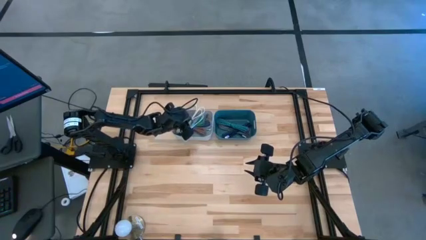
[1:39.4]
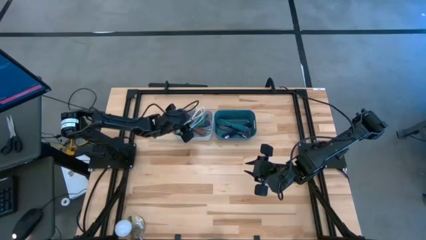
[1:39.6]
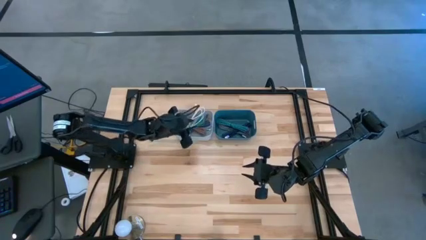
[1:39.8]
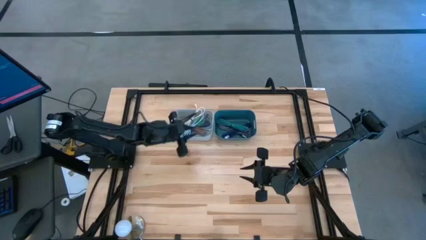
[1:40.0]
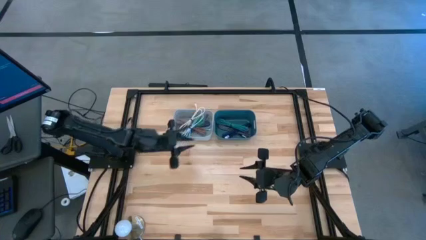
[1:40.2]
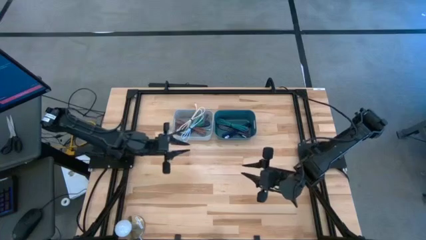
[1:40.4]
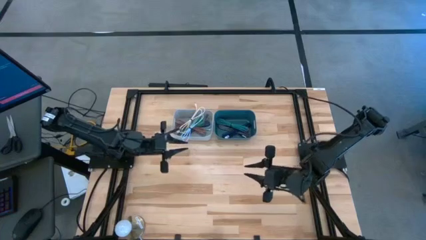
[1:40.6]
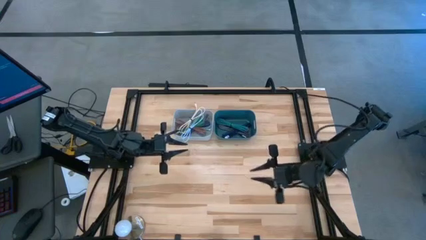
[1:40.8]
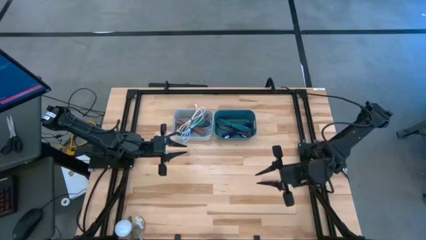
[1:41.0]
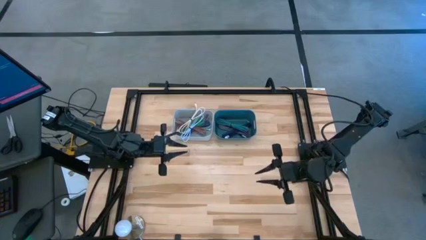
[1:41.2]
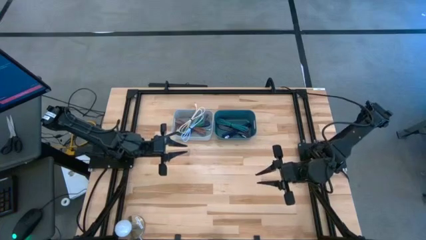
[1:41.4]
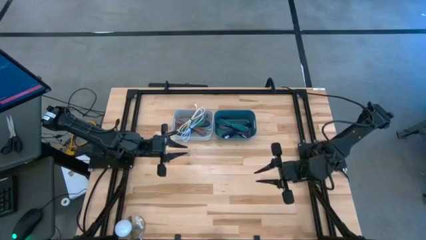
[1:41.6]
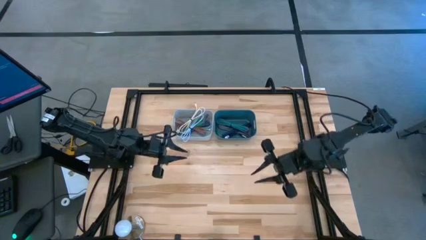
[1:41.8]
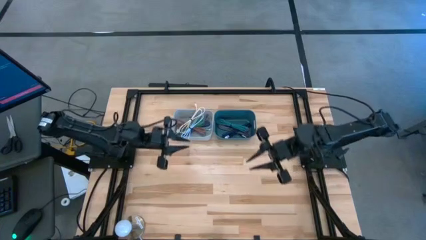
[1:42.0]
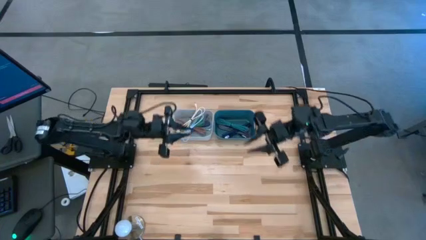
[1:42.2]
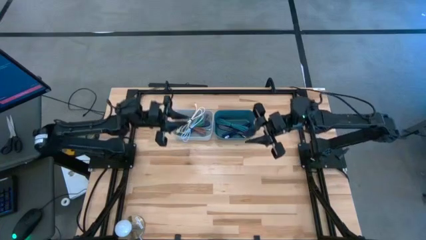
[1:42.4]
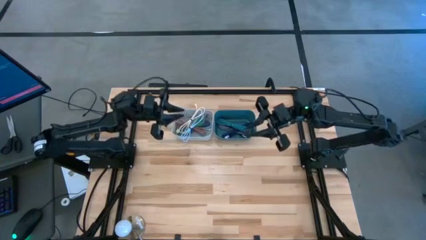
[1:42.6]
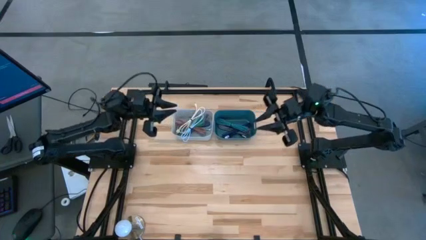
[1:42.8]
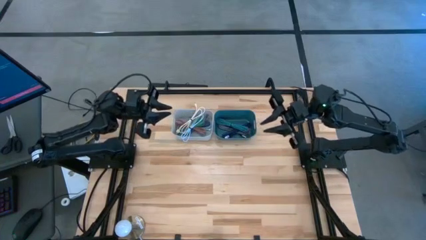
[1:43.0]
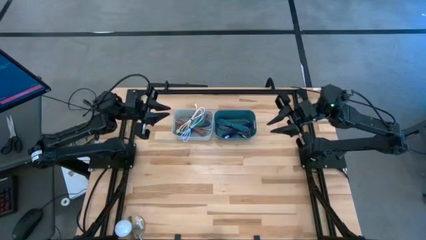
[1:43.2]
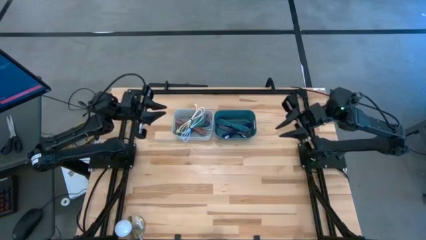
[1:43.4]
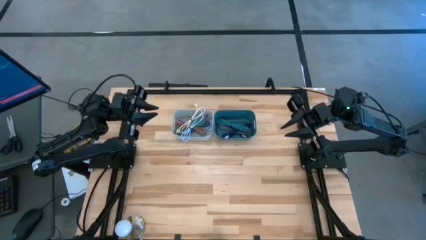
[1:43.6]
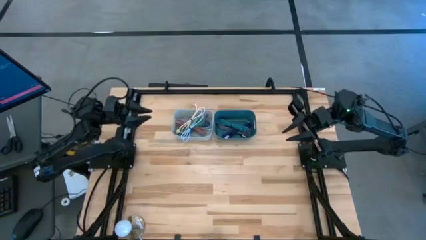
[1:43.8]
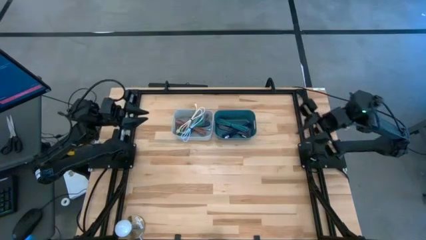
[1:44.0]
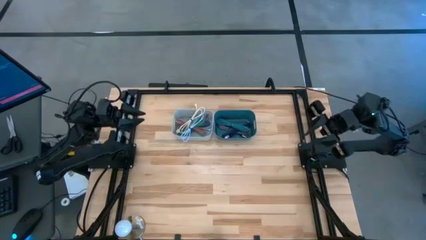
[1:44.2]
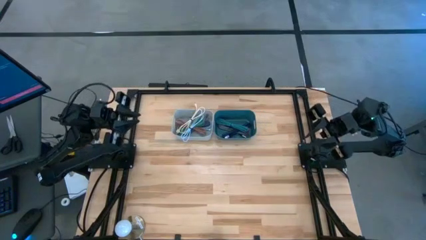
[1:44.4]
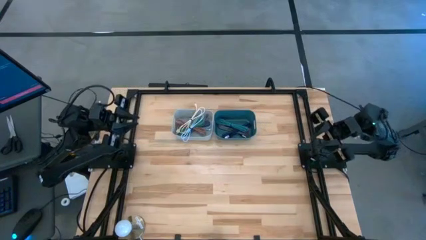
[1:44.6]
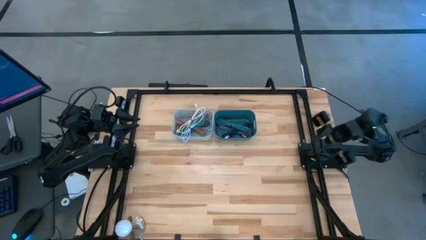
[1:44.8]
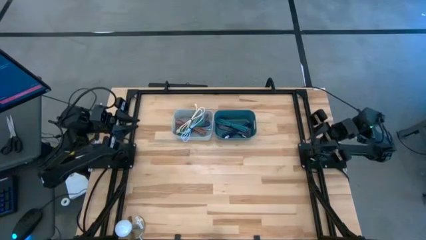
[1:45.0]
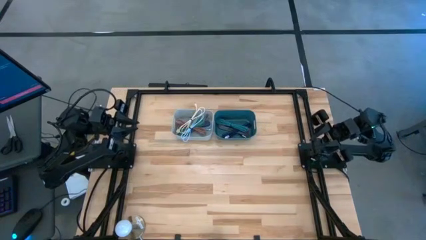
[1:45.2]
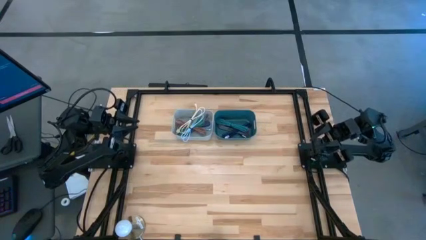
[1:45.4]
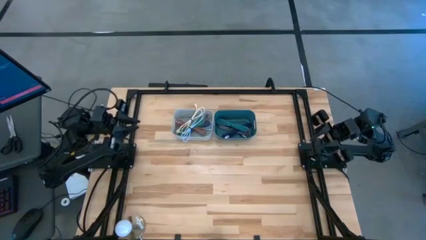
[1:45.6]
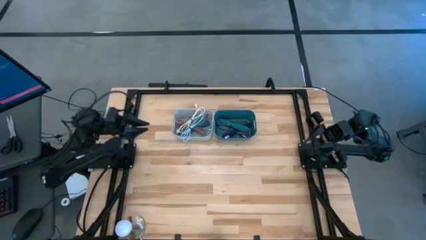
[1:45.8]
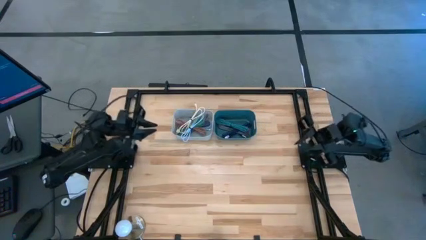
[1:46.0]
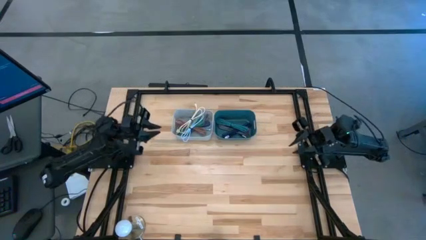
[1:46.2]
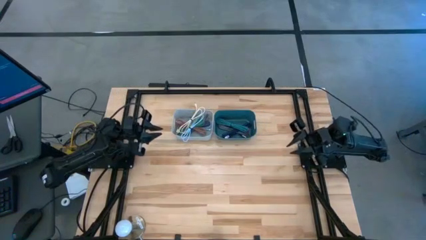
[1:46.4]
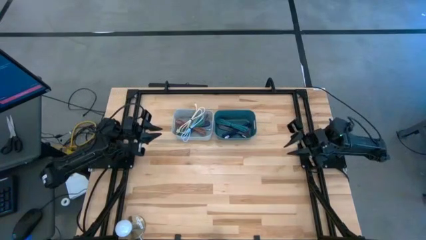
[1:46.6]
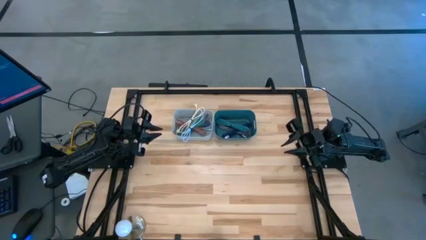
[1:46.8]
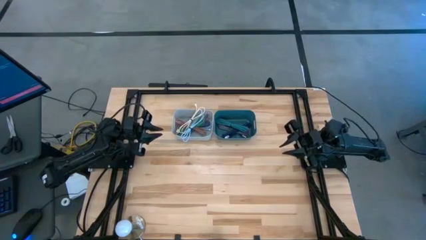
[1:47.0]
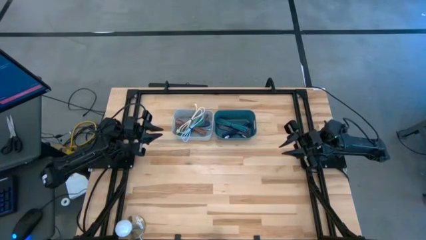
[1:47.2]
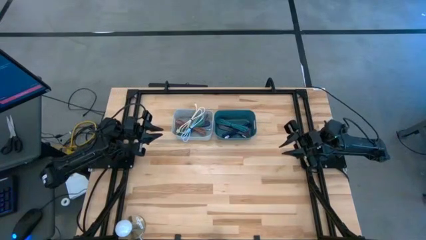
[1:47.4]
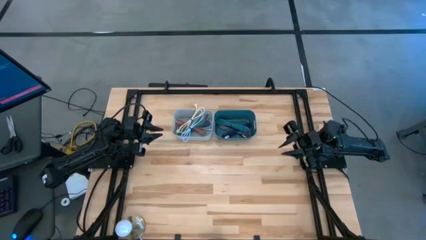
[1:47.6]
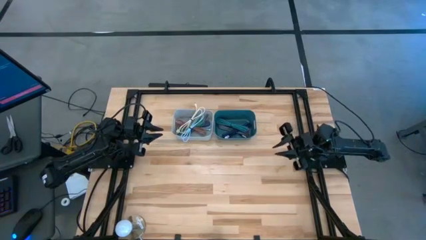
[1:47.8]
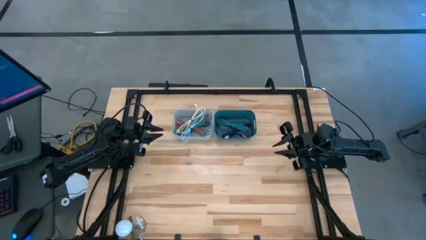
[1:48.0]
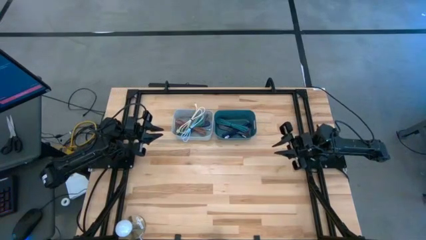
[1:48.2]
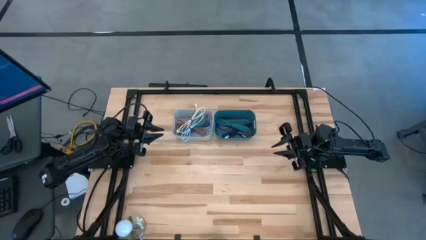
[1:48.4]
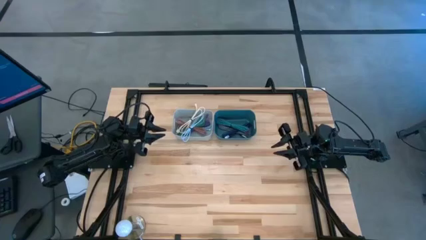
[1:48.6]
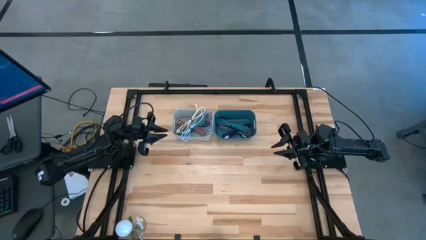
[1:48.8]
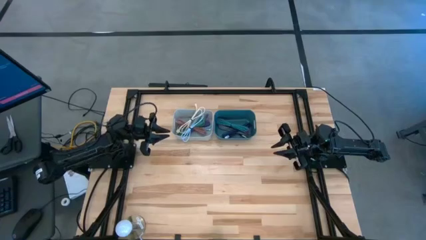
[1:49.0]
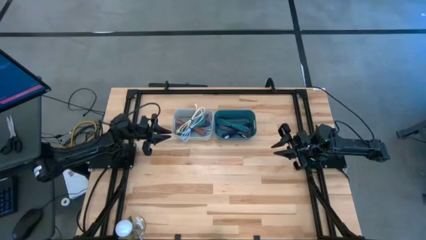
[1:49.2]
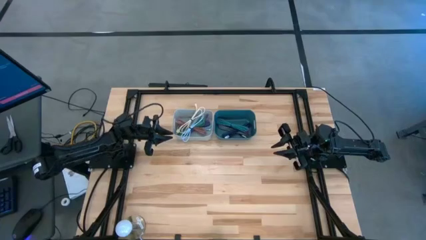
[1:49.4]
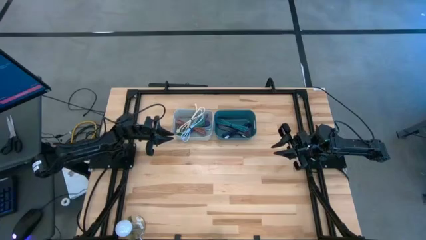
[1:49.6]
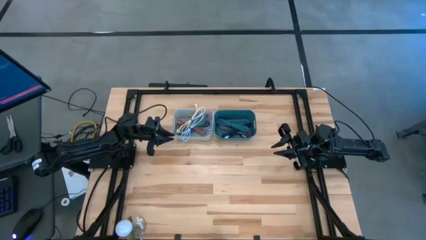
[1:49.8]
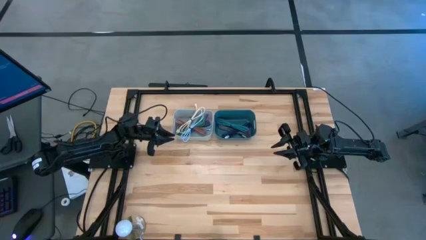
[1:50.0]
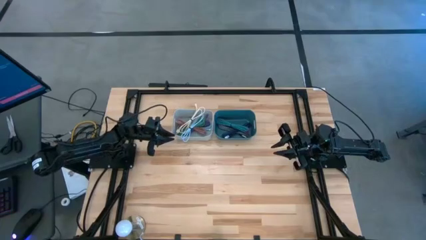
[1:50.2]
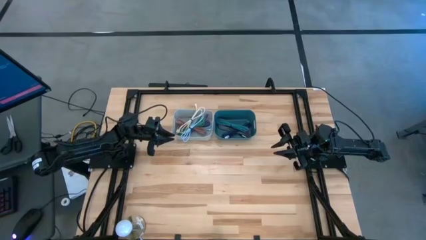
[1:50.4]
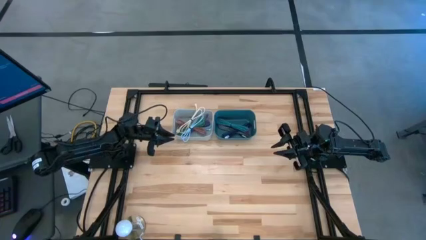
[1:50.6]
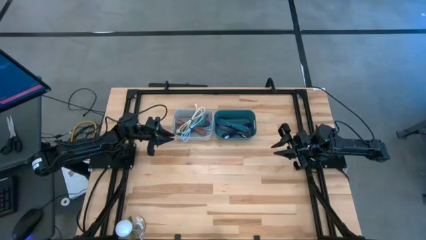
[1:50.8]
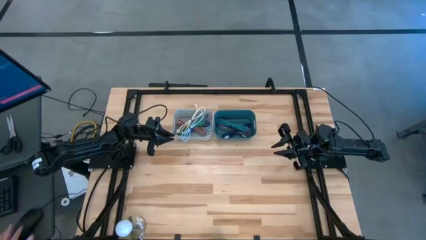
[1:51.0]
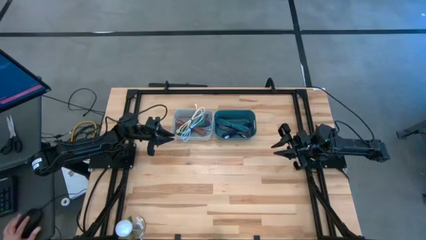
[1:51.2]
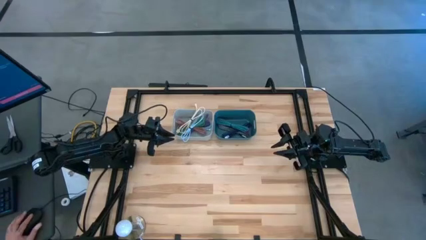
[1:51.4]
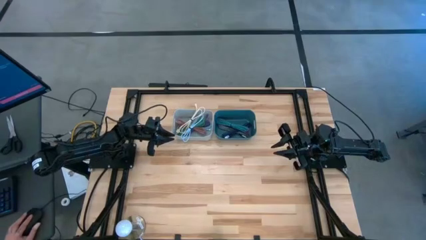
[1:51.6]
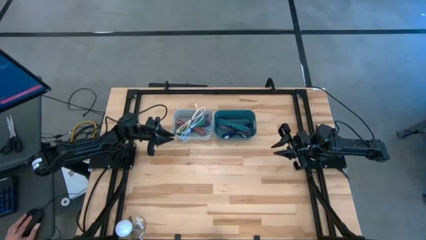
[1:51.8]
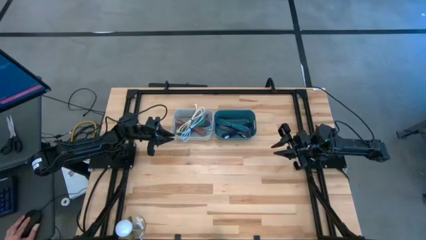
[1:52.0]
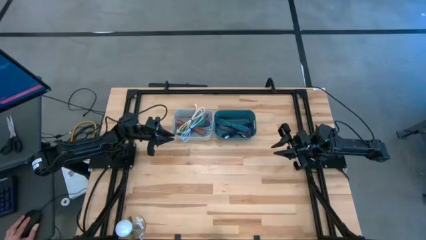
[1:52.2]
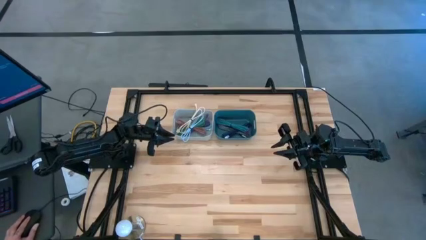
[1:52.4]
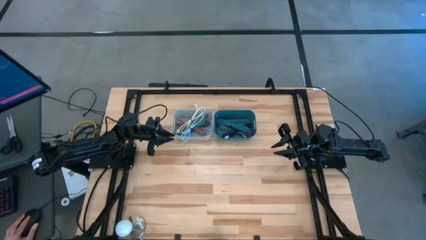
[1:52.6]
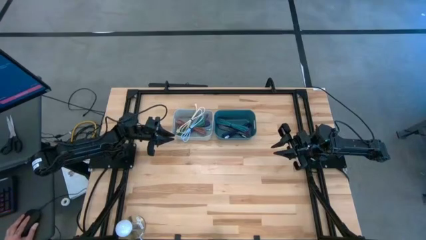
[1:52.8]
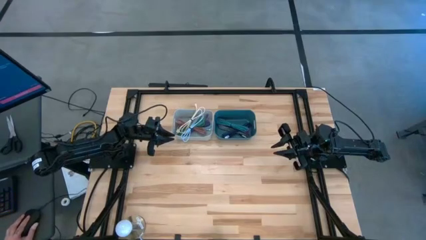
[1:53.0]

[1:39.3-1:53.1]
Task: Pick & Place USB Port
Return to Home Position
